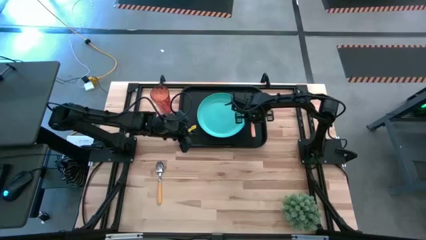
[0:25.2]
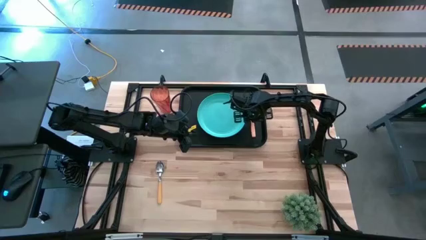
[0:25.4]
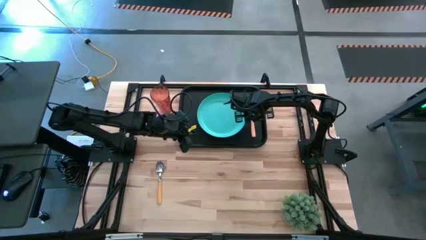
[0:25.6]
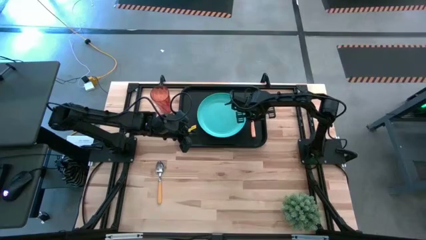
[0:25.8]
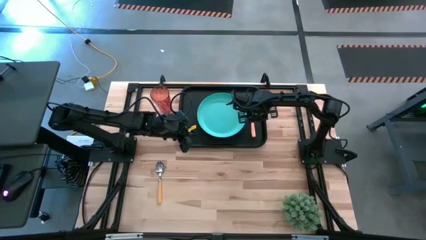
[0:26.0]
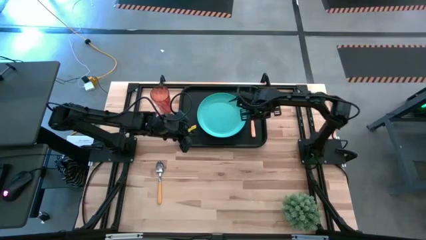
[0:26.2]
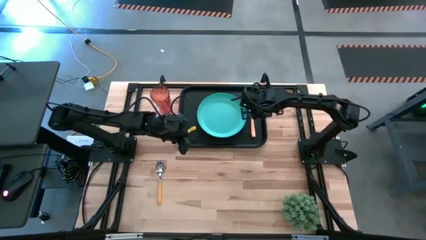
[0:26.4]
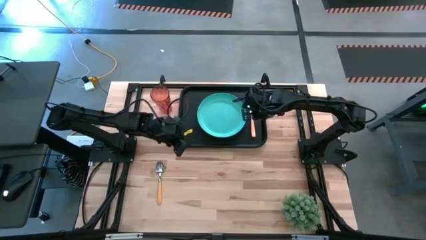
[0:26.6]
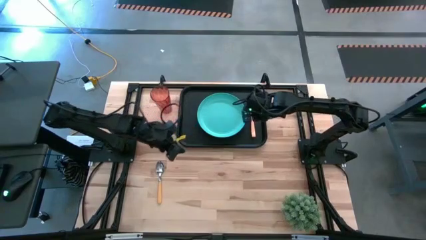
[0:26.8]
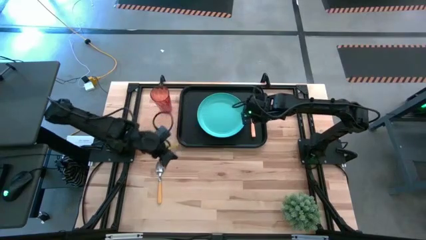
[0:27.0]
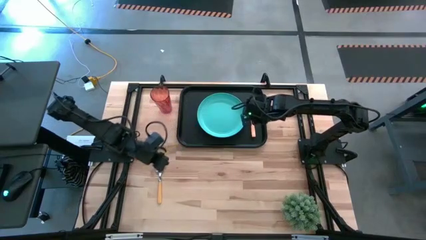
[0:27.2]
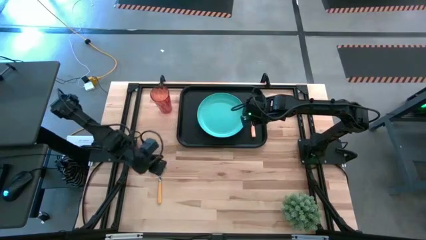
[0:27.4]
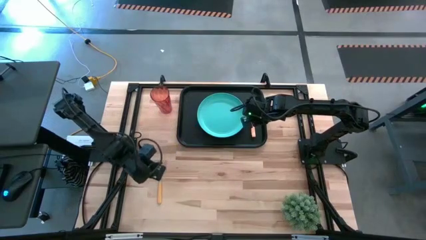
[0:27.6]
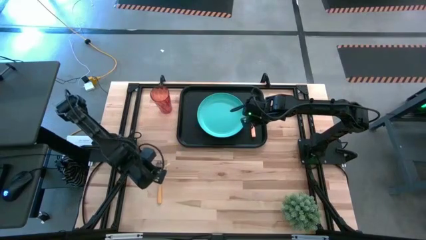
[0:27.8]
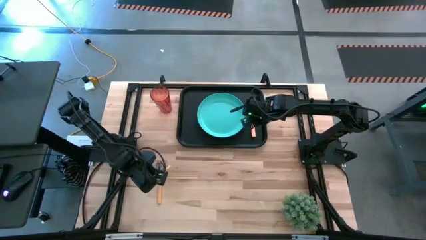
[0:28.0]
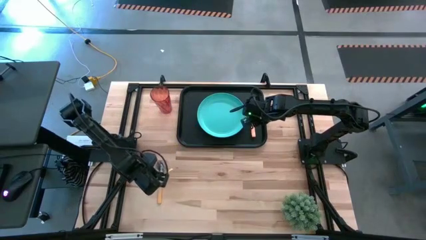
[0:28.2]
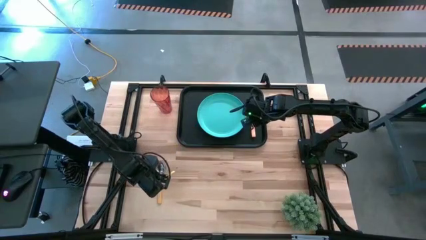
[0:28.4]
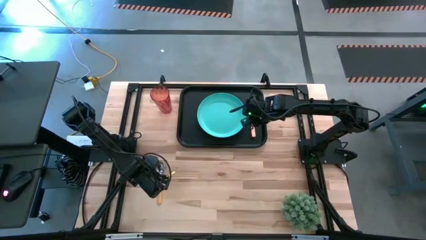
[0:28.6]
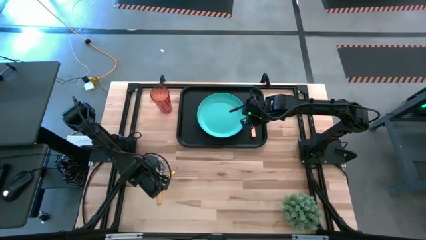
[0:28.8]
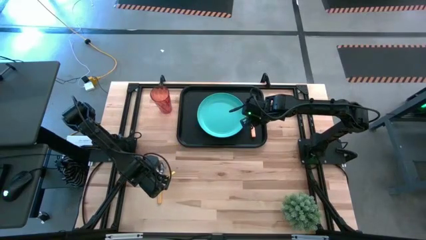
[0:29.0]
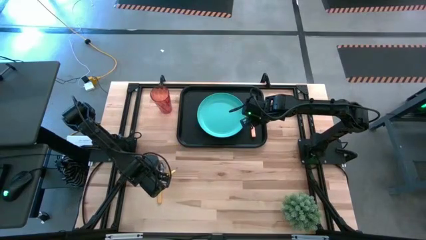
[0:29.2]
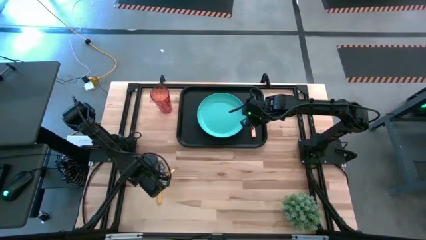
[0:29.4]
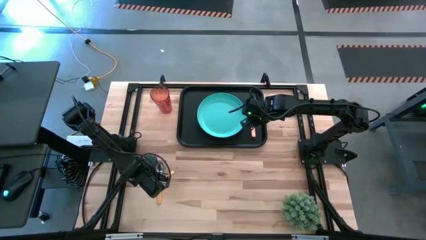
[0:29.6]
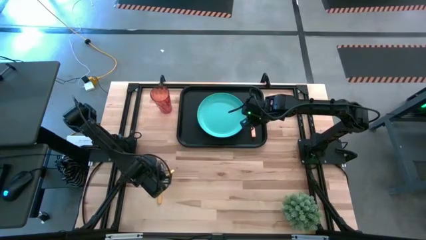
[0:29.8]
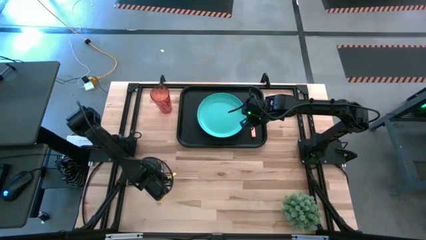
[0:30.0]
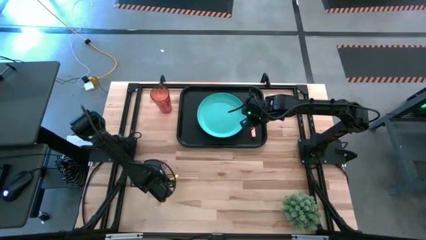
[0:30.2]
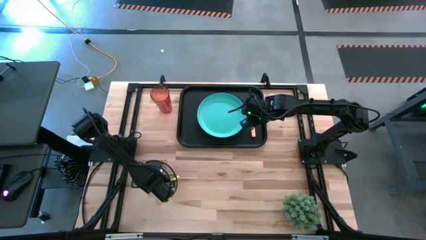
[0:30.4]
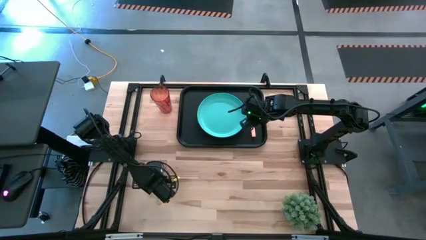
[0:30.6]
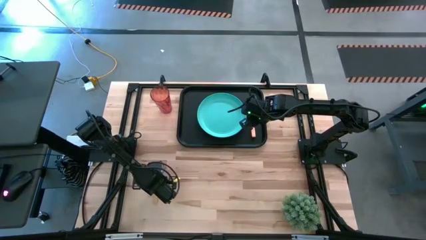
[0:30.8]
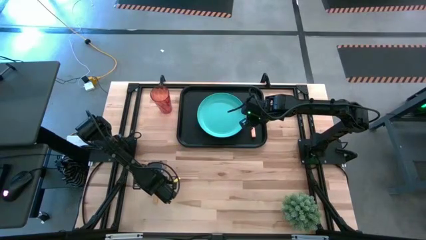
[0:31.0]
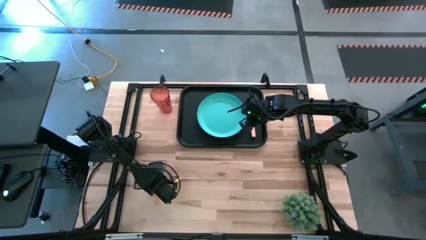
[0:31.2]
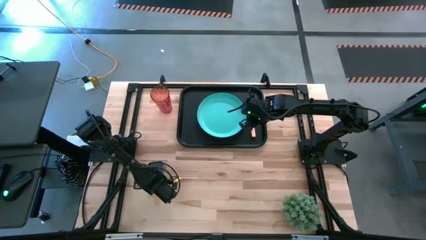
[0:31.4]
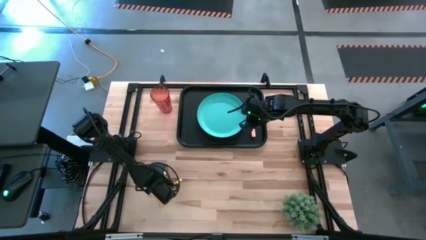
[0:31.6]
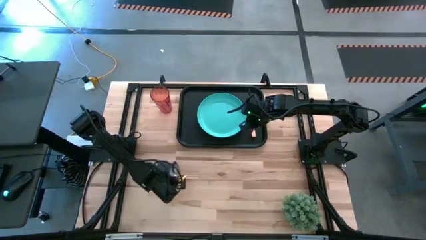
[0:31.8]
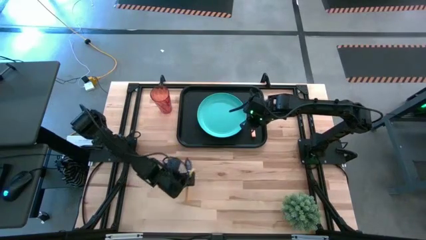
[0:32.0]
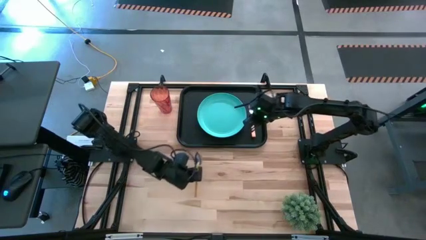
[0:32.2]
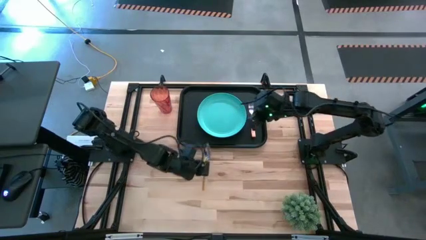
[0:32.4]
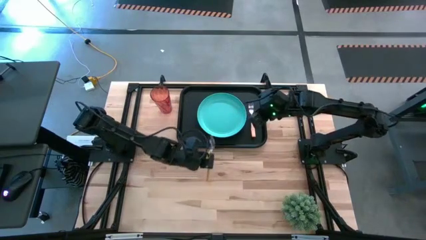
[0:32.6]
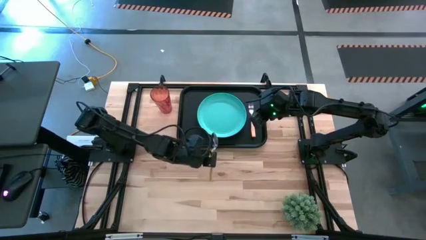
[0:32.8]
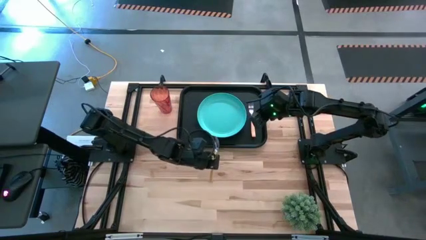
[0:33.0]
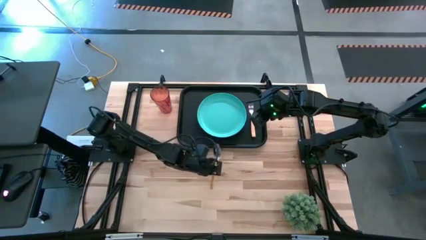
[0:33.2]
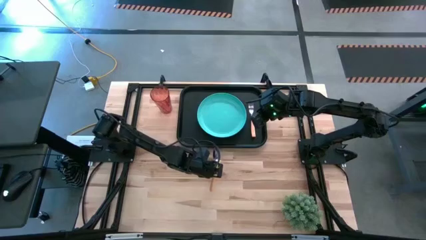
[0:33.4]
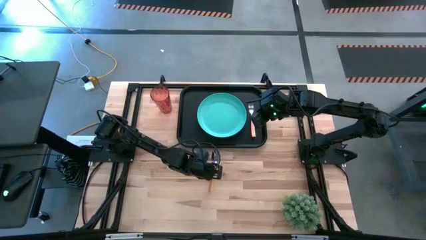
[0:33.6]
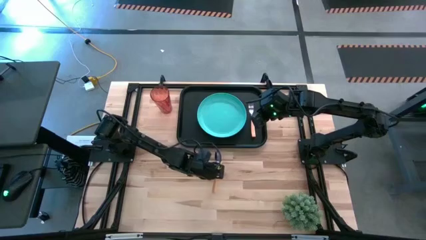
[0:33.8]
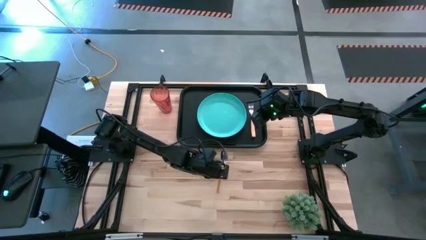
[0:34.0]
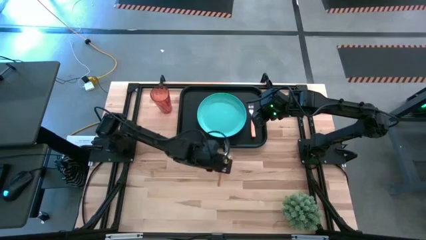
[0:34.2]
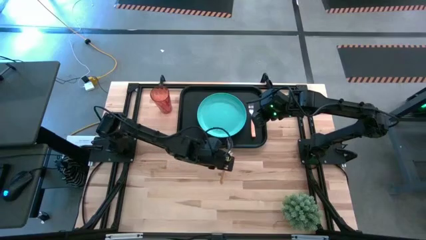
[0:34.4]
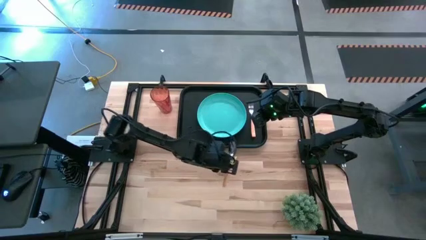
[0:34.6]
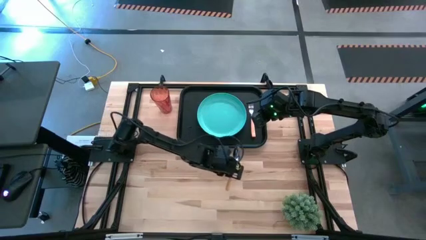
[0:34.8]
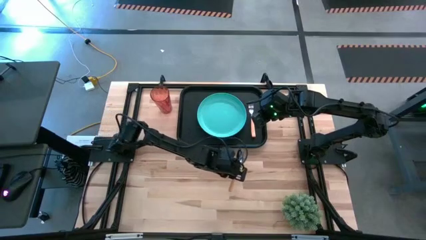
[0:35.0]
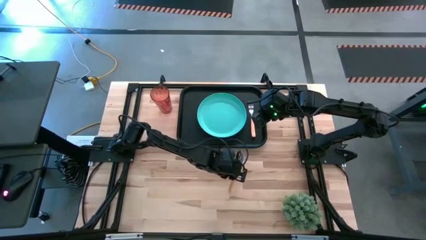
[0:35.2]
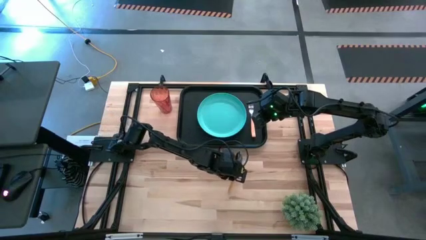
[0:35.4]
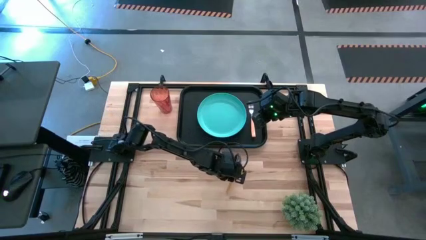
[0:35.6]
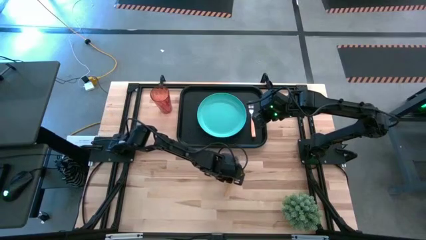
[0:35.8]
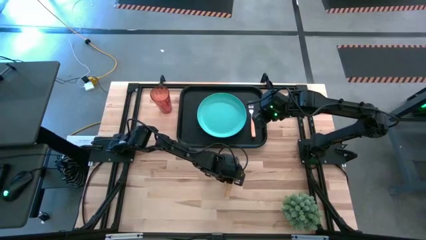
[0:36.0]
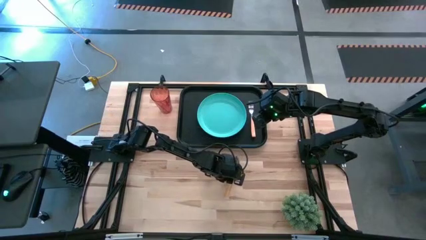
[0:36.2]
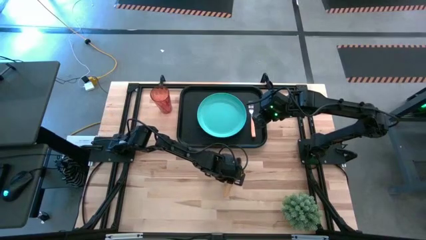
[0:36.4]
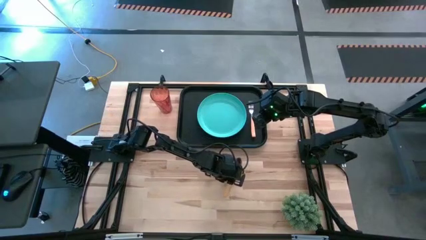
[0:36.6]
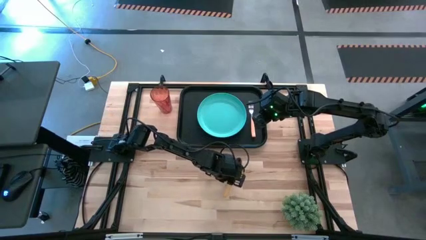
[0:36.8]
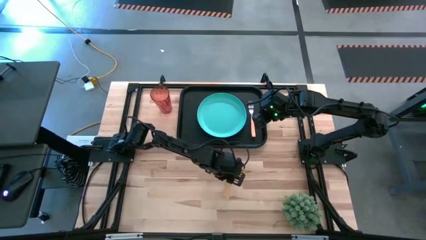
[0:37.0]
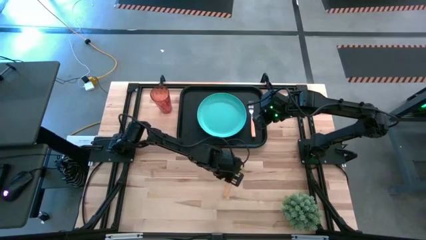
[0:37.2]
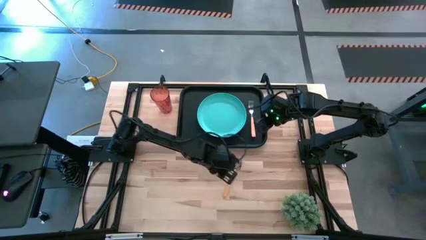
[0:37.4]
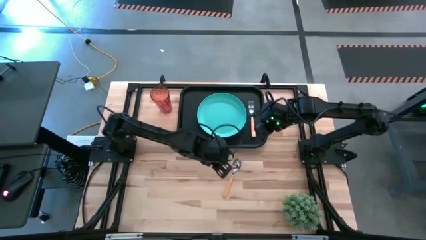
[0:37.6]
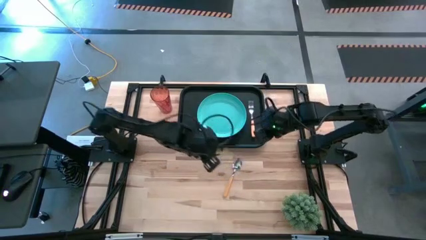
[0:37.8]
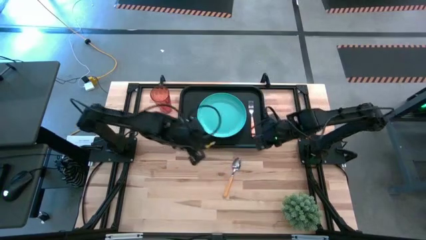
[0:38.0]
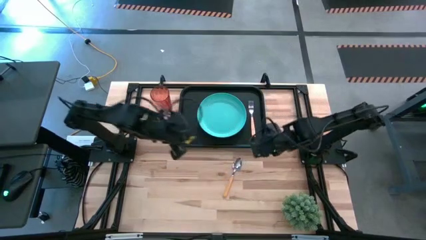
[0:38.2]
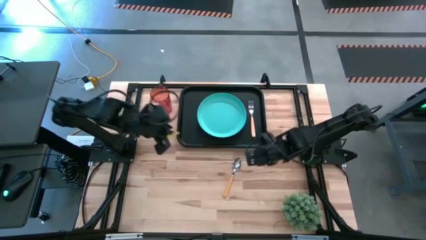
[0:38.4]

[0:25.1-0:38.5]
Task: Pick and place plate/cup/fork/spoon on tray
Put the yellow spoon on the black serving tray to the right of the orange fork

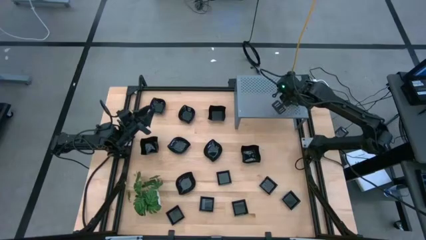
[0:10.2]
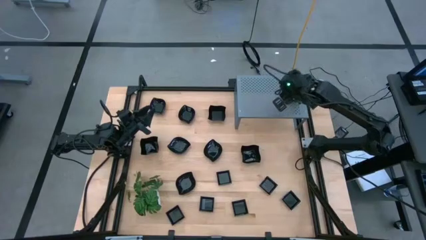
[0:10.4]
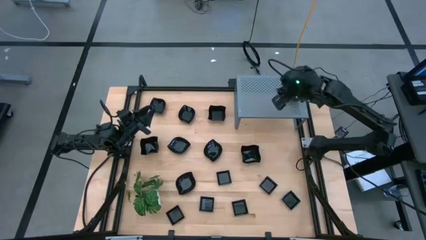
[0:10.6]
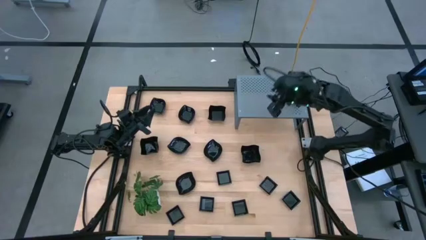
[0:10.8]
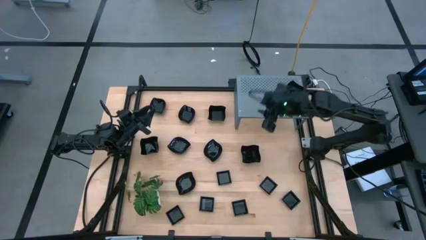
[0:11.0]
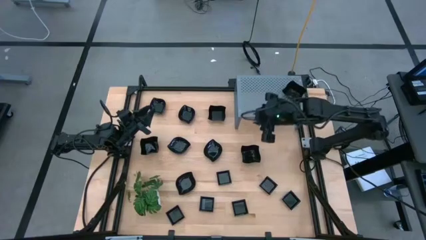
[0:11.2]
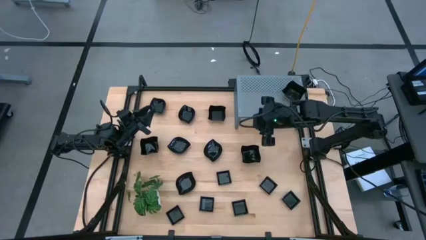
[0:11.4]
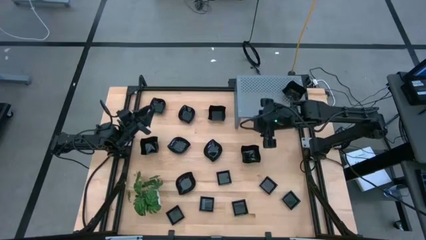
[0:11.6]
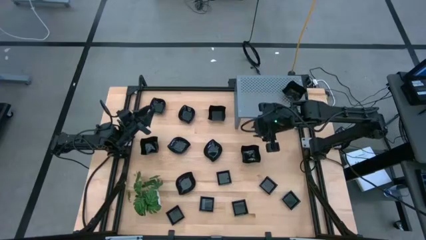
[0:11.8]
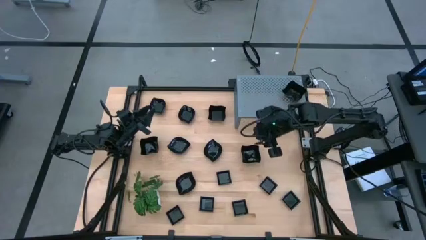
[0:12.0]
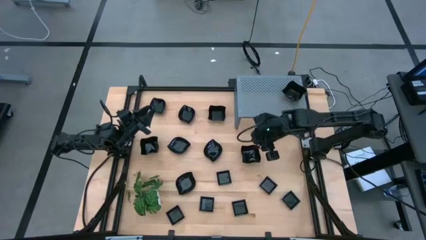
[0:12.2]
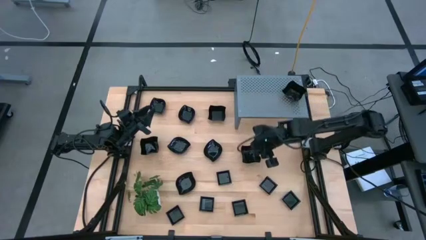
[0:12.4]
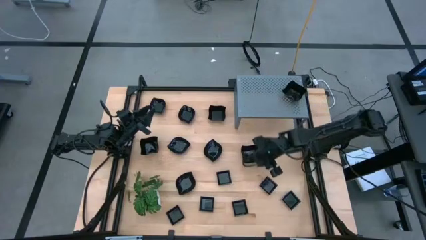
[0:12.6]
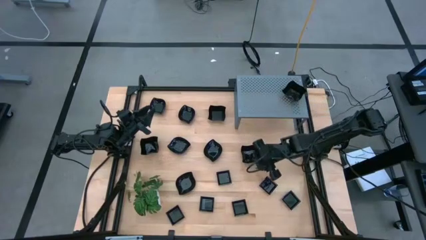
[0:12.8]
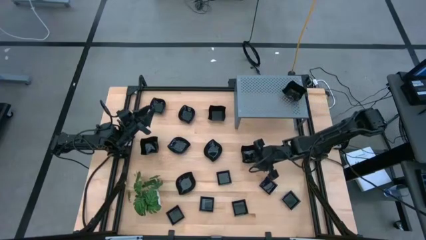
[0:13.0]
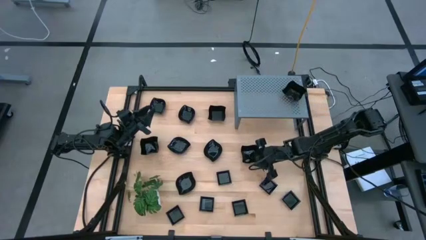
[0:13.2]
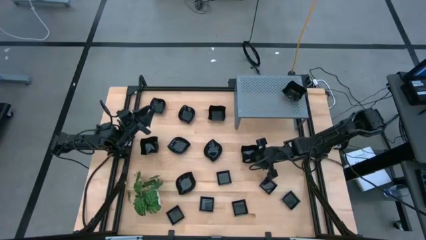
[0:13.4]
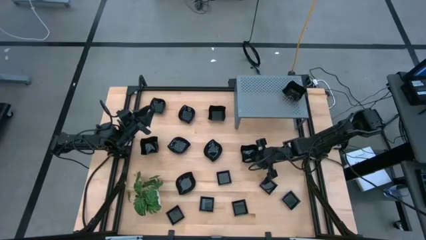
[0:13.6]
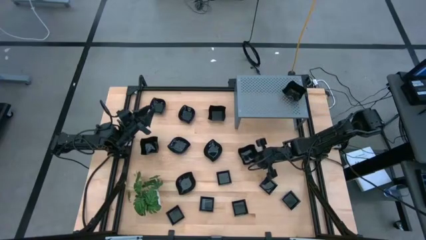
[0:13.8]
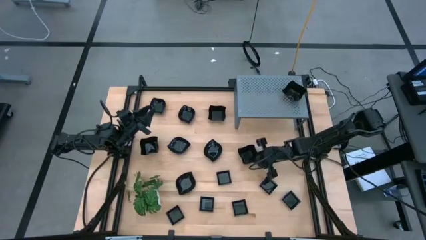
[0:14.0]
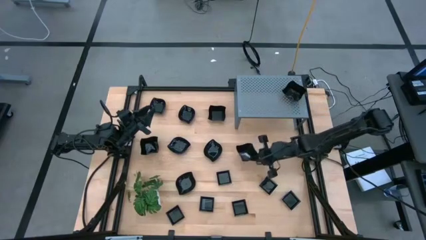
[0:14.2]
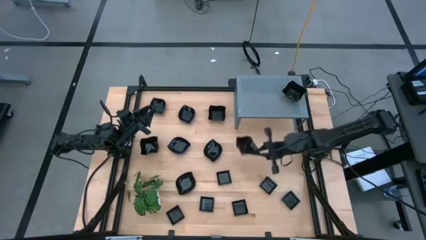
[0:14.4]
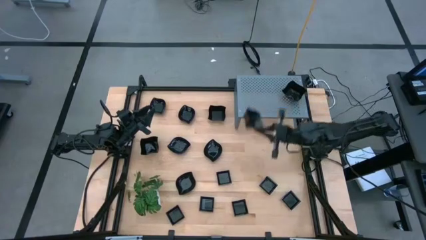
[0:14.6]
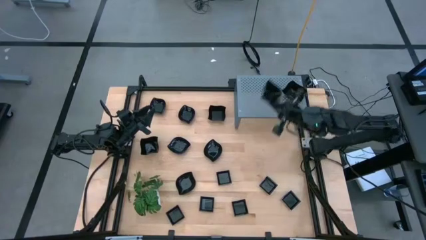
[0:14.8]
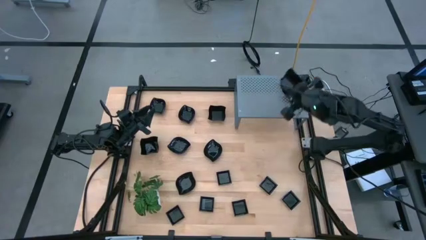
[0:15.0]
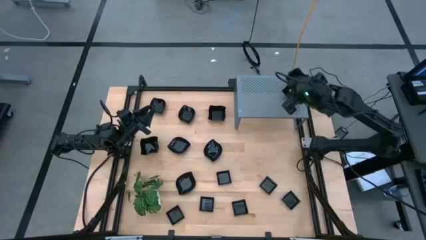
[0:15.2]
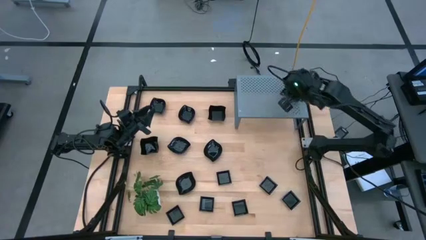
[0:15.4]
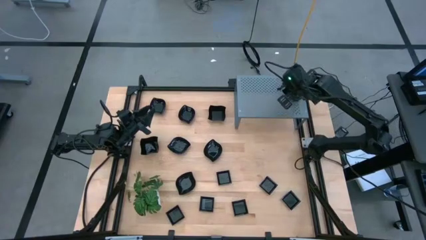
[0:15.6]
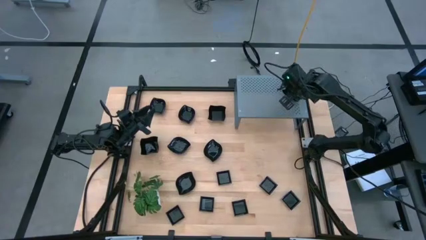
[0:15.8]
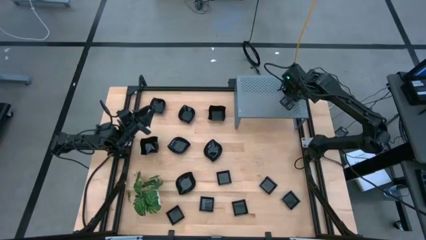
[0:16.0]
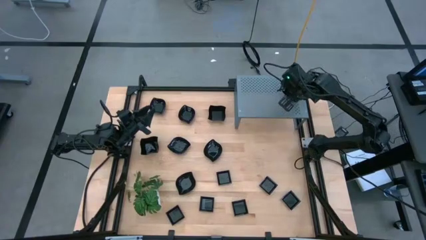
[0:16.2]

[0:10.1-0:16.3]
Task: Pick & Place Mini shaped plates
Stack the distorted square plate on top of the other distorted square plate
